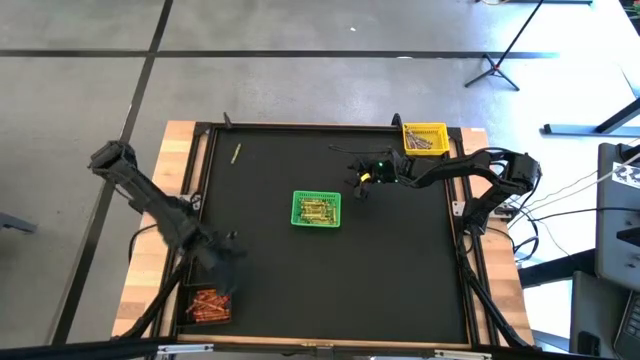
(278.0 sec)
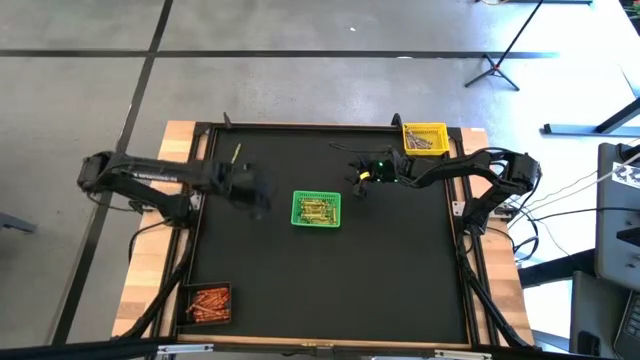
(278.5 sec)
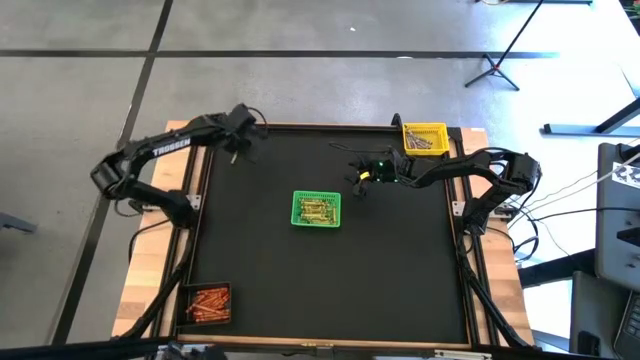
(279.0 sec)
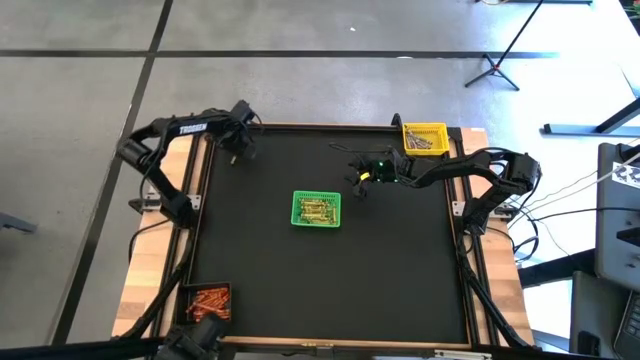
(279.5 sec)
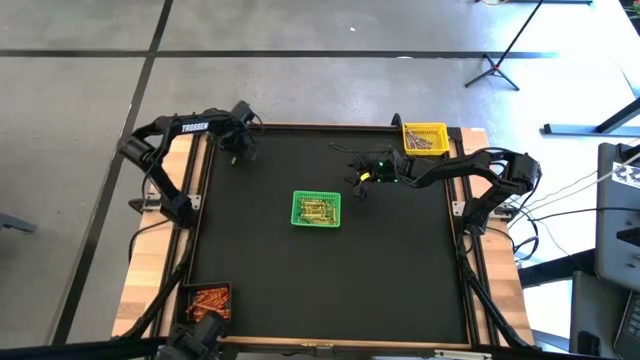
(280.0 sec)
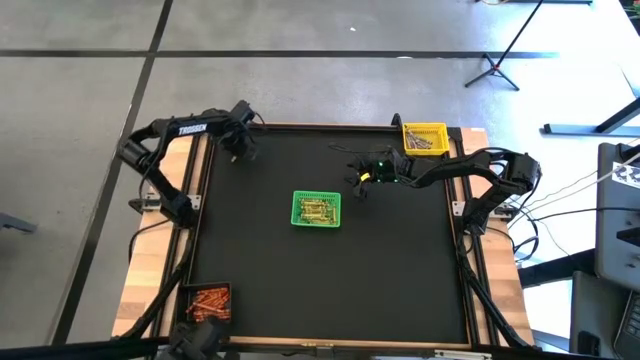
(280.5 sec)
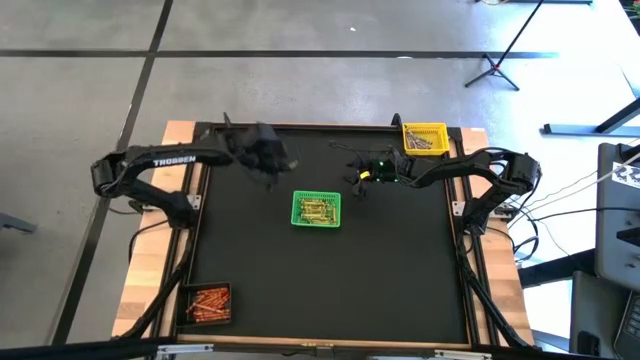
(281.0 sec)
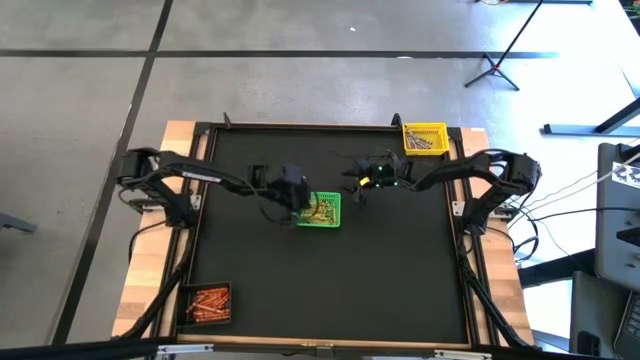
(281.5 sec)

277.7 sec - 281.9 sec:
Task: Sort crayons
Put the green crayon into the green bin

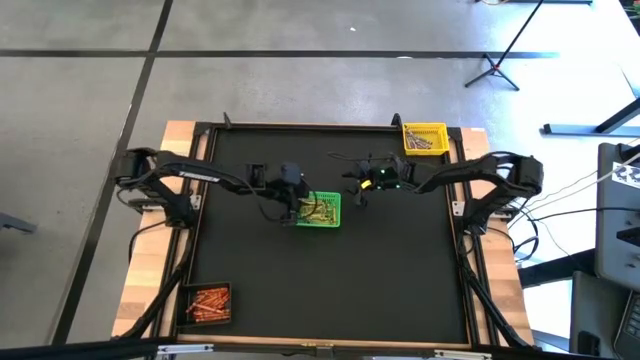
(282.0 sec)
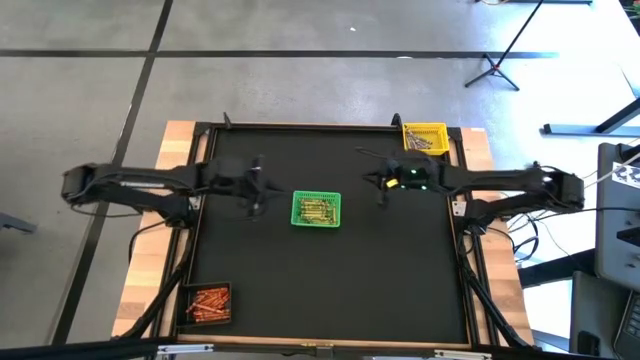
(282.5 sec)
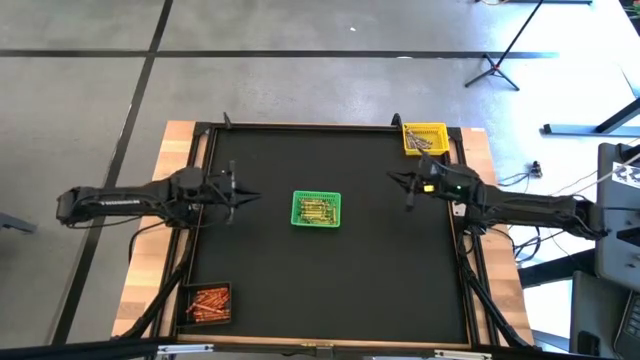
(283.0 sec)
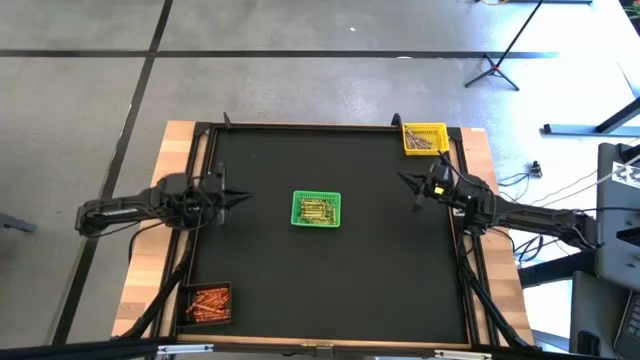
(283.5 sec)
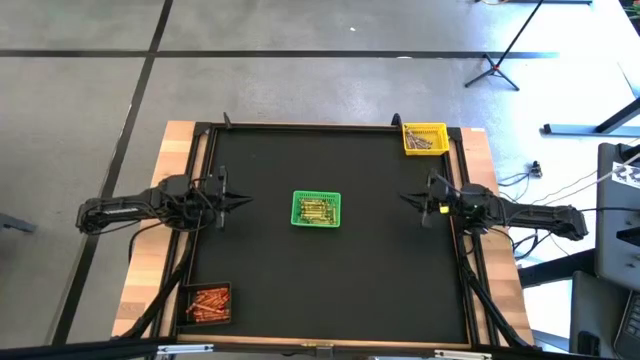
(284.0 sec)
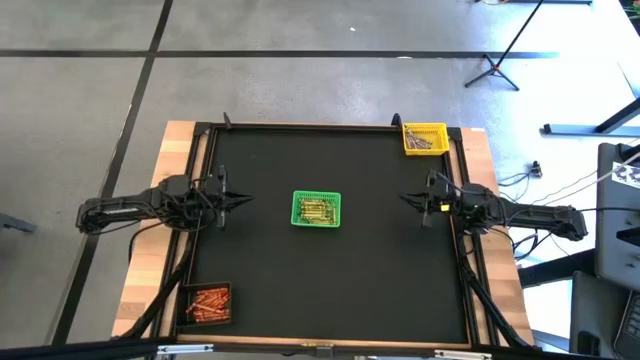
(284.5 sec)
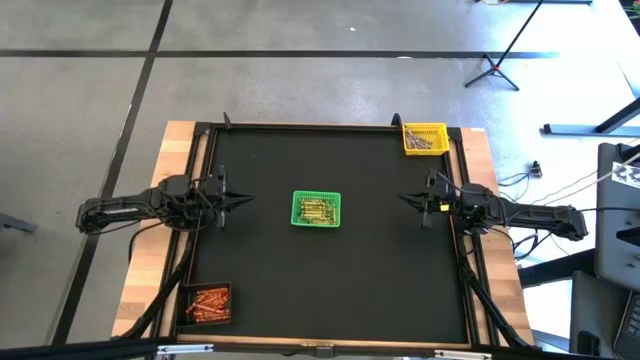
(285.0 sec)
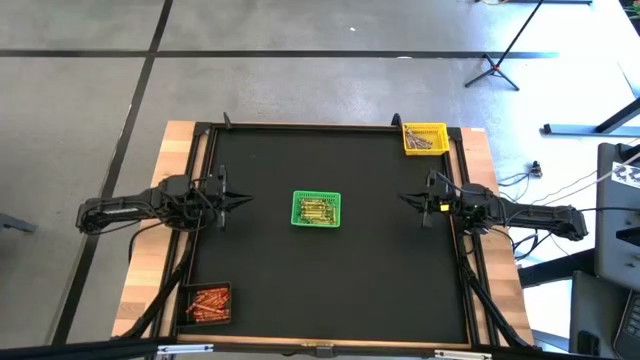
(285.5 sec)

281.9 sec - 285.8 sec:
Return to Home Position

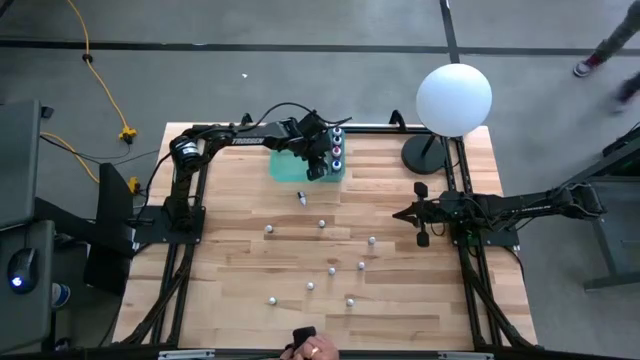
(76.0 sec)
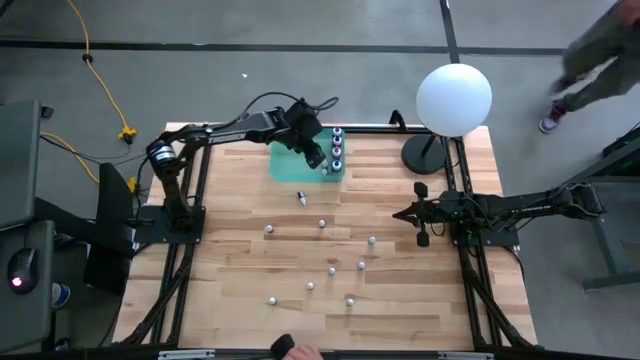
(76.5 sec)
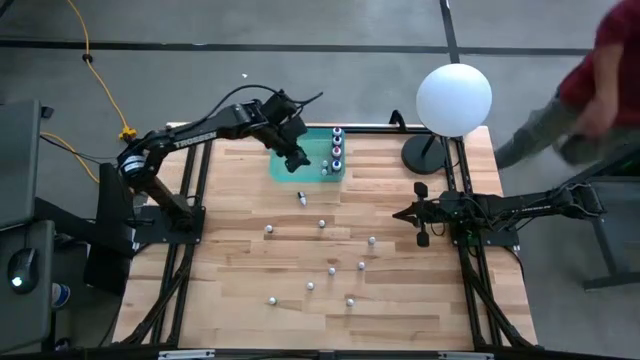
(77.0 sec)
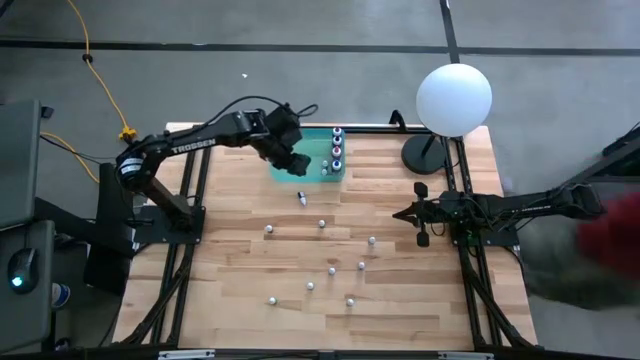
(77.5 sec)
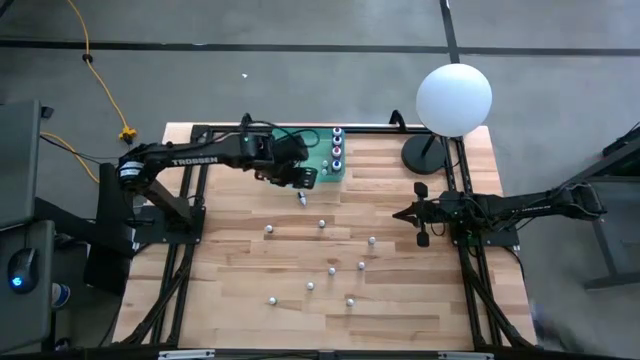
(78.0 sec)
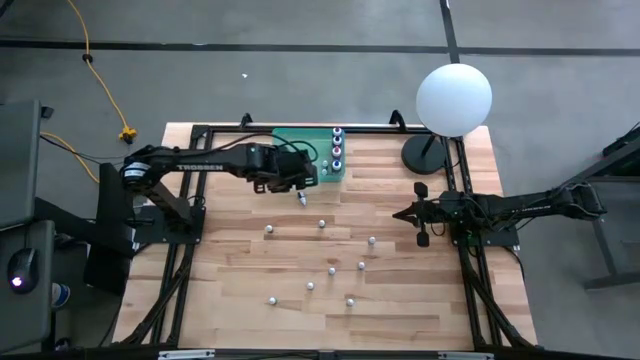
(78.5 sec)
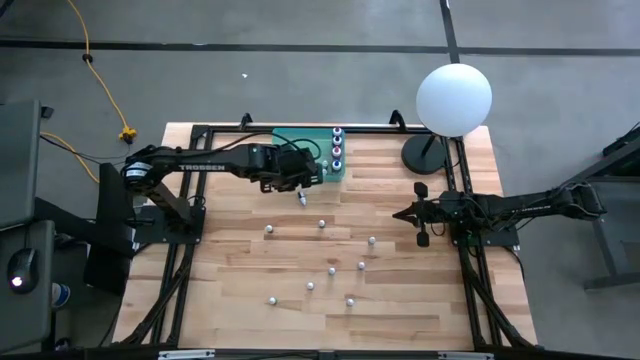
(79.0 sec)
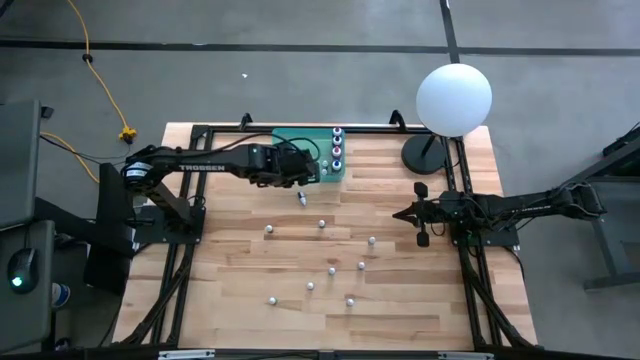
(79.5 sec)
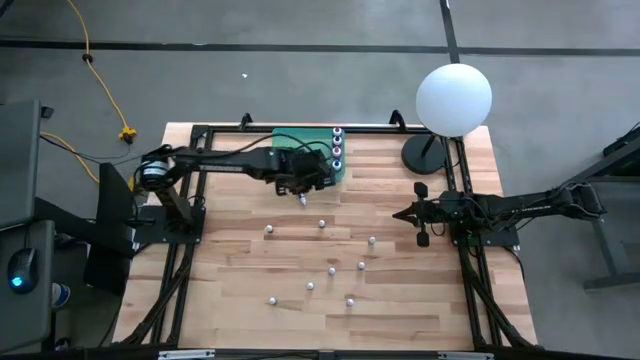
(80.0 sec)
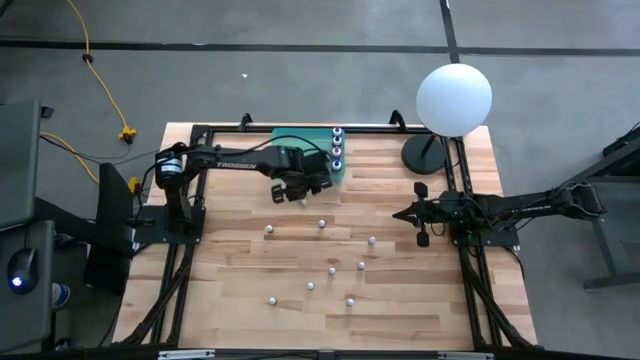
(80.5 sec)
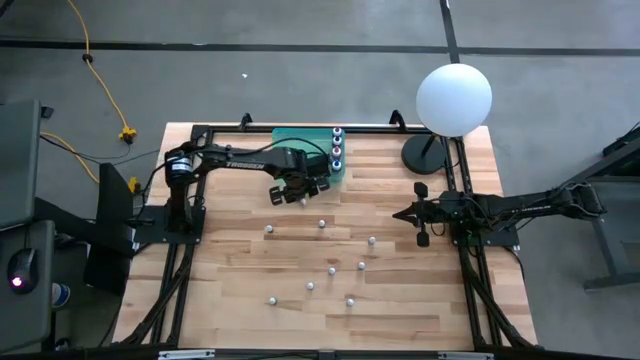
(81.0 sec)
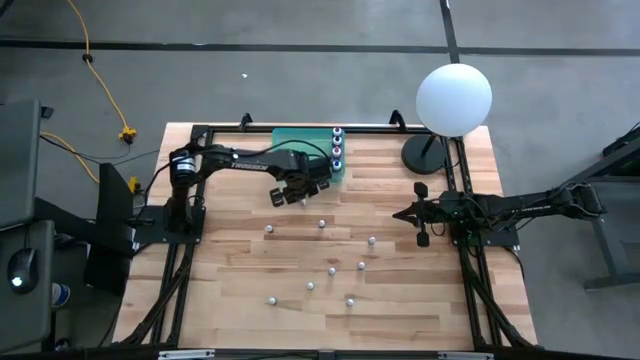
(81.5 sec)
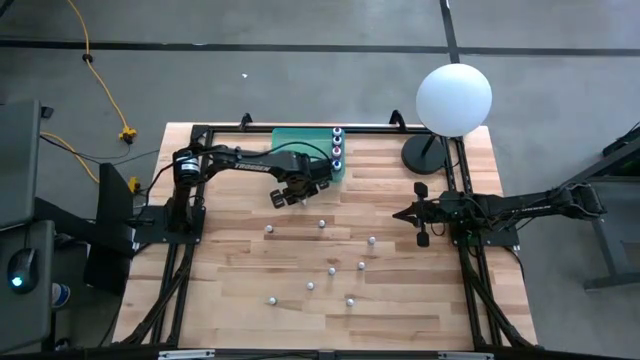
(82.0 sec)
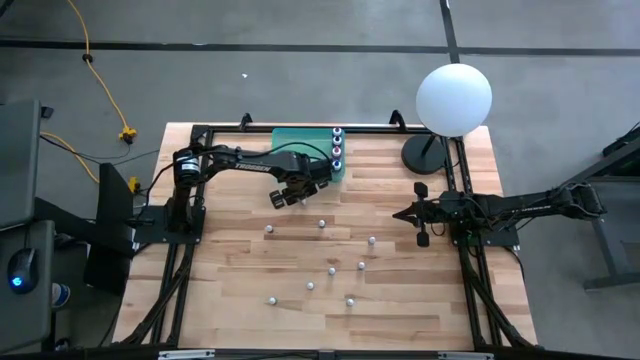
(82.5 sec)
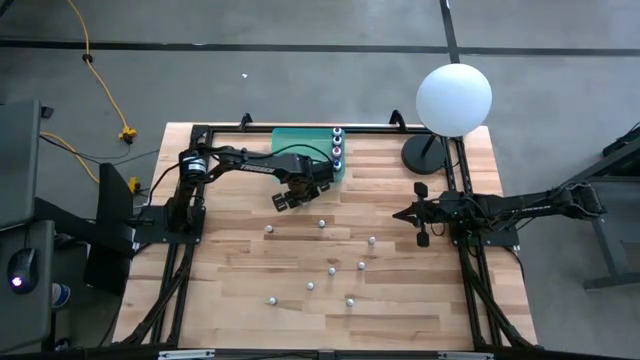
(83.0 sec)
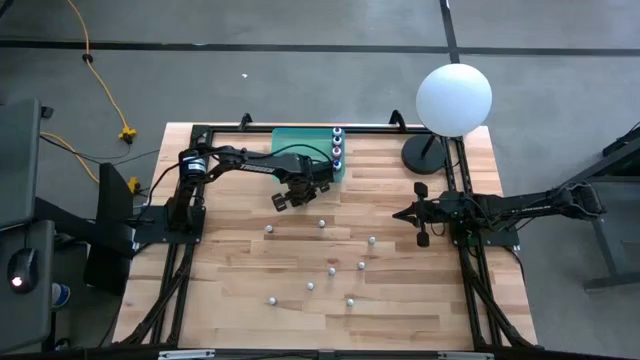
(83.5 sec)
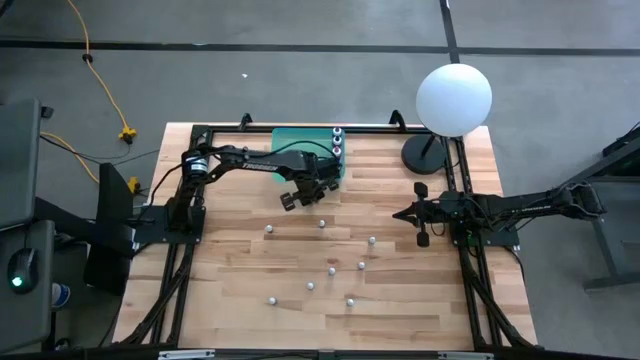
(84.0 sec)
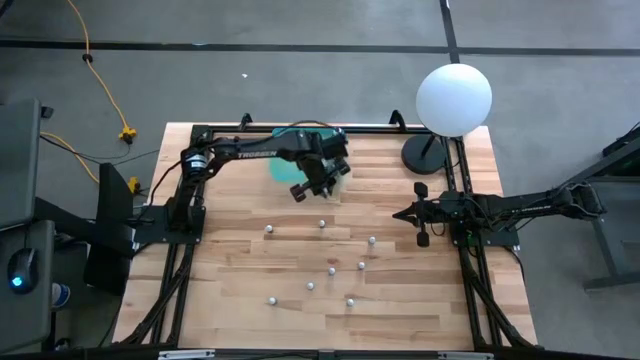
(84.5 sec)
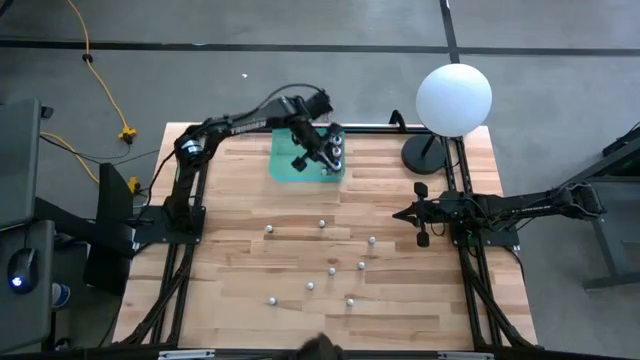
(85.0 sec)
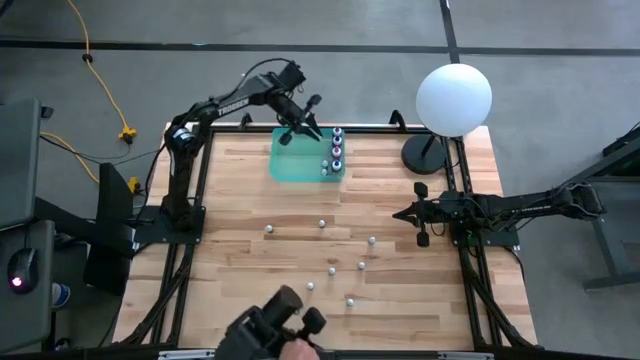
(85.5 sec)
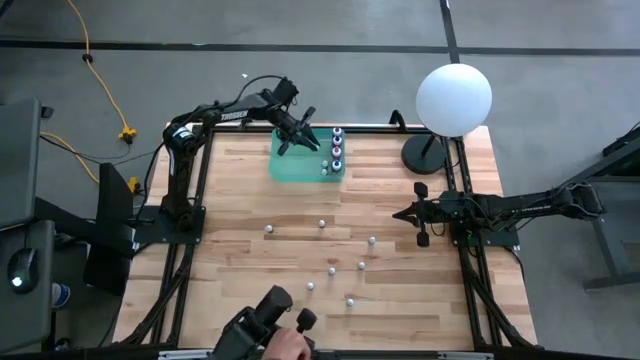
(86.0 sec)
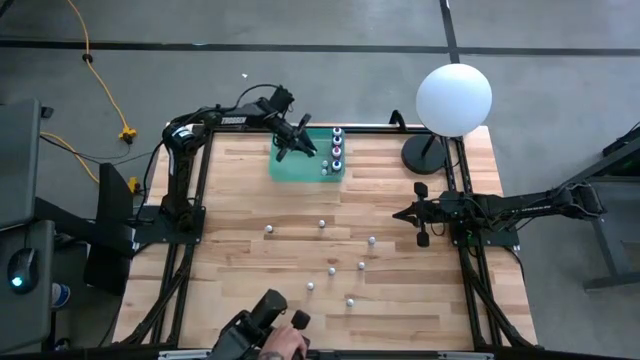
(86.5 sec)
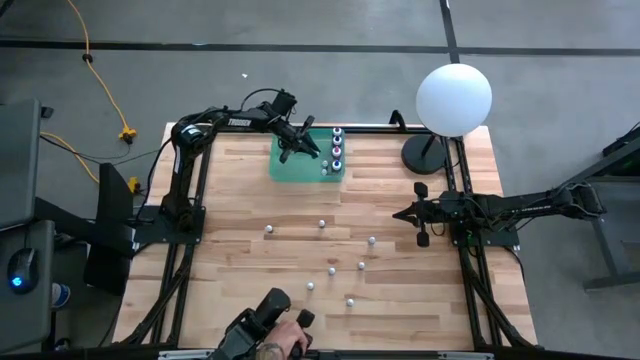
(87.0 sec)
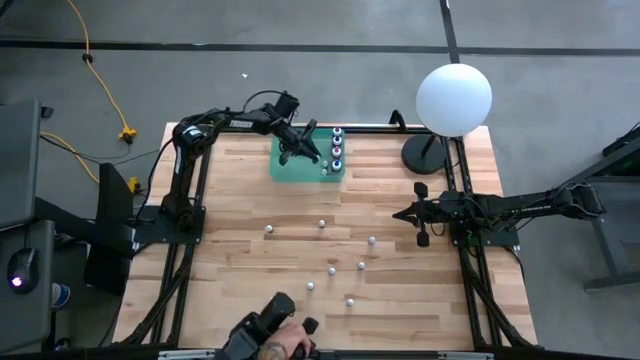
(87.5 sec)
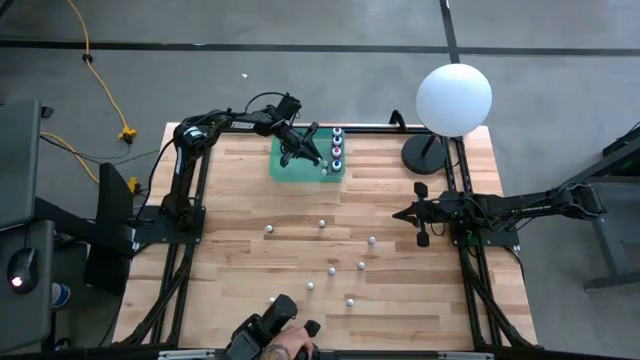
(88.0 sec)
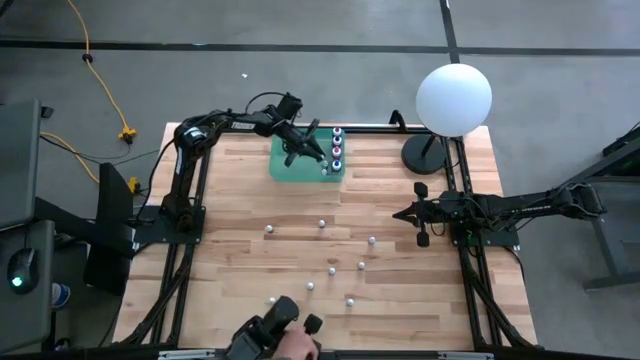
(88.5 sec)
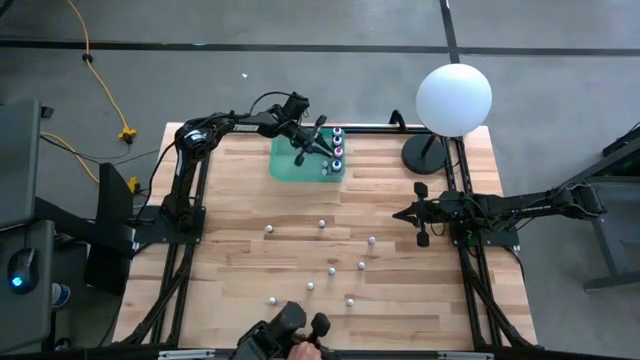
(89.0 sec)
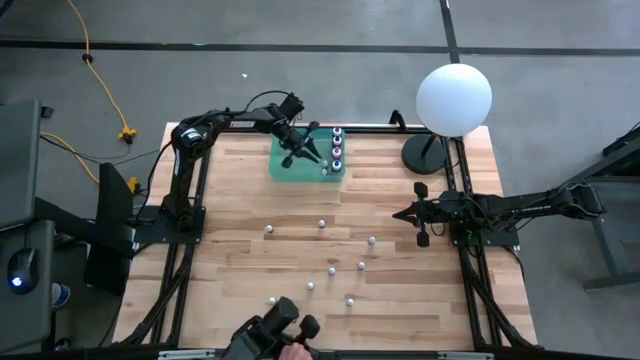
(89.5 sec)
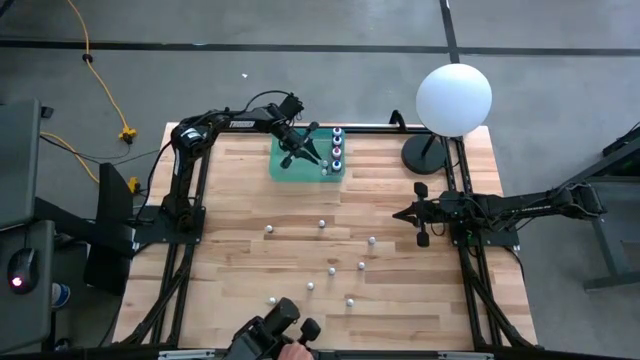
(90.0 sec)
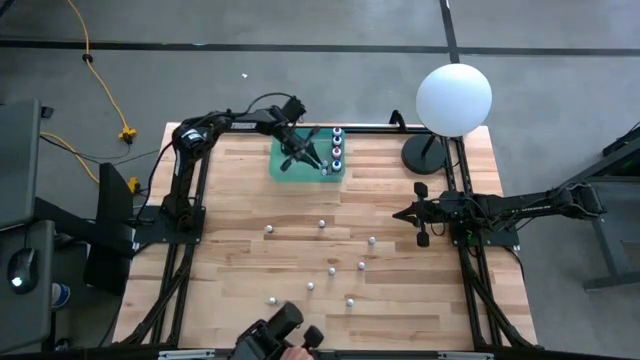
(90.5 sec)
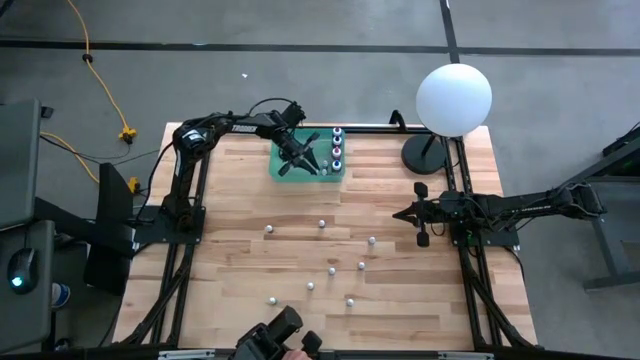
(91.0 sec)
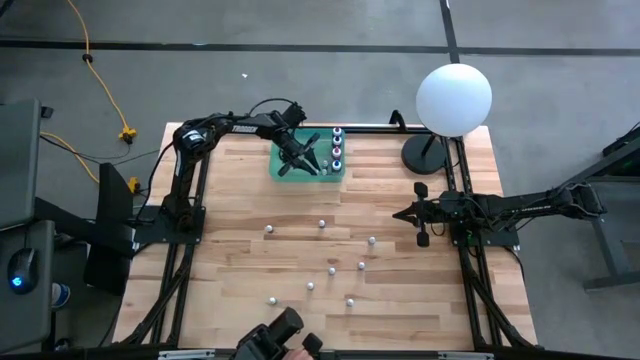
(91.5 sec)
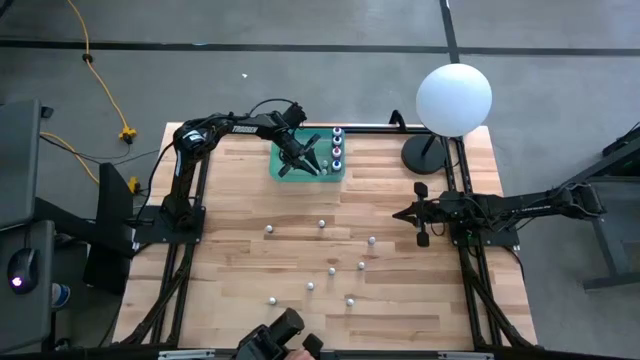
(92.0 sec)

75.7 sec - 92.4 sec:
Task: Pick & Place food coloring
Put the small black food coloring bottle into the blue transparent bin
